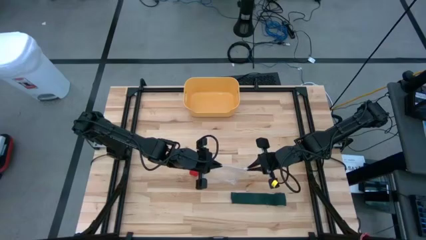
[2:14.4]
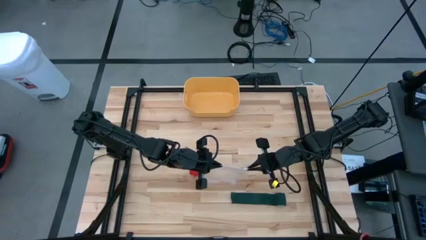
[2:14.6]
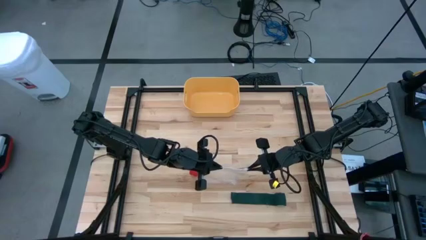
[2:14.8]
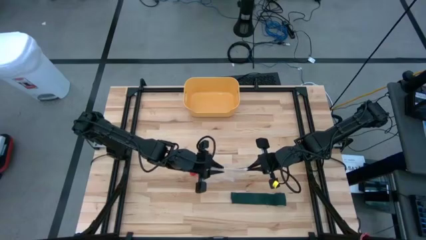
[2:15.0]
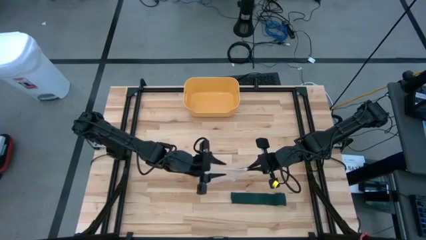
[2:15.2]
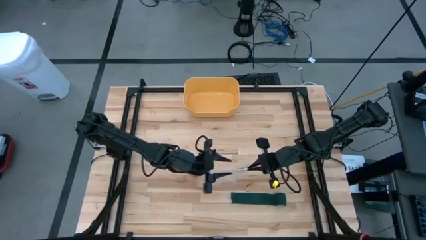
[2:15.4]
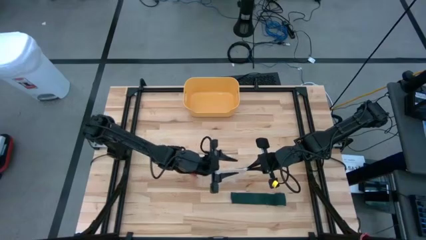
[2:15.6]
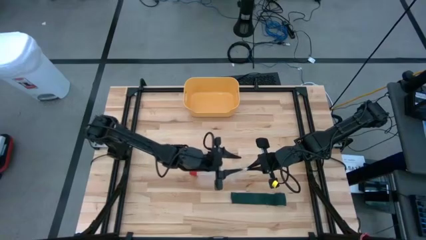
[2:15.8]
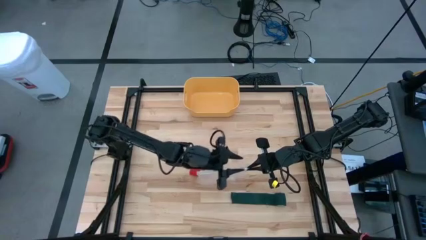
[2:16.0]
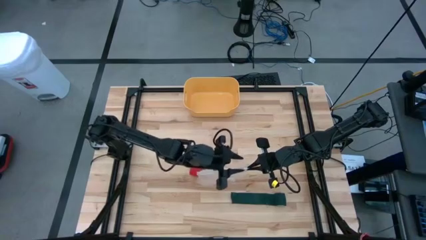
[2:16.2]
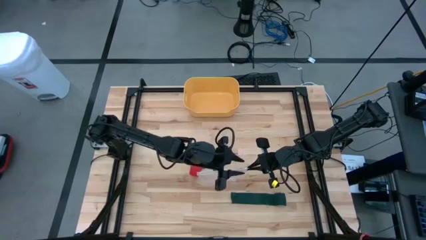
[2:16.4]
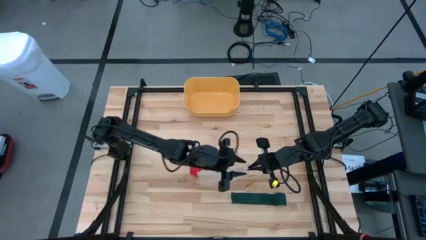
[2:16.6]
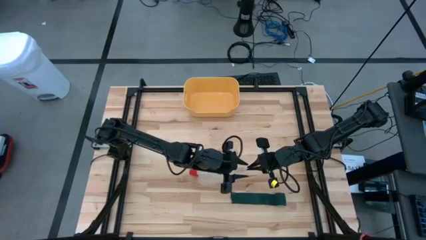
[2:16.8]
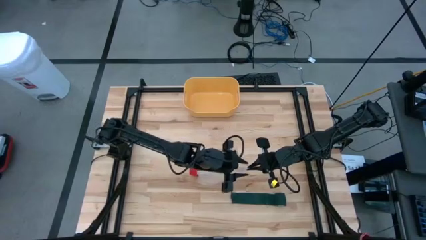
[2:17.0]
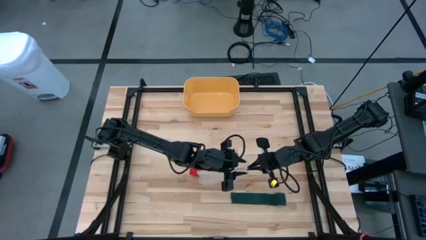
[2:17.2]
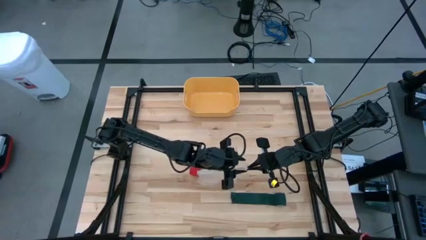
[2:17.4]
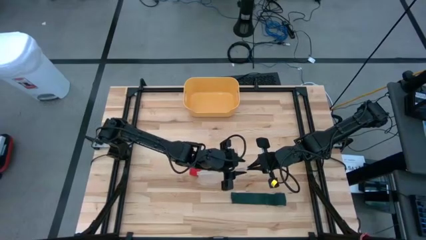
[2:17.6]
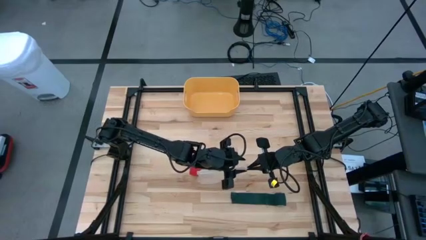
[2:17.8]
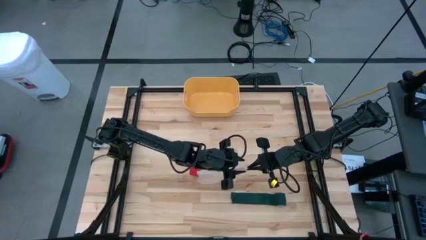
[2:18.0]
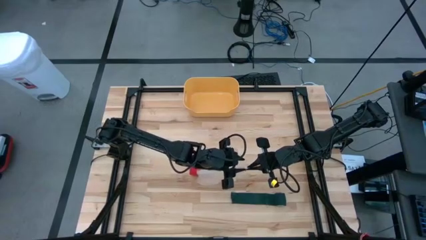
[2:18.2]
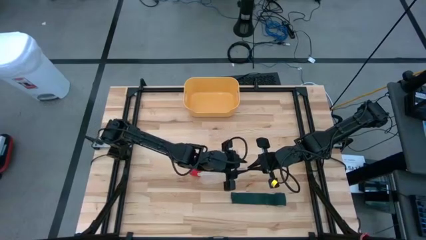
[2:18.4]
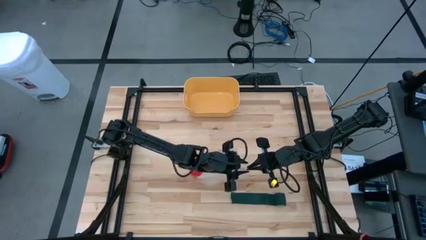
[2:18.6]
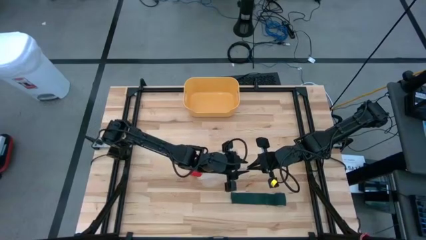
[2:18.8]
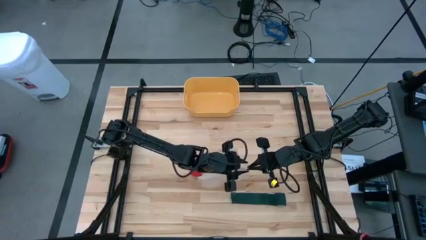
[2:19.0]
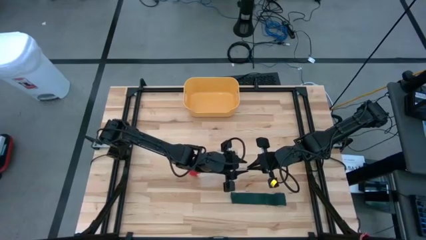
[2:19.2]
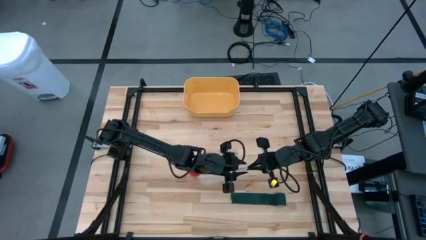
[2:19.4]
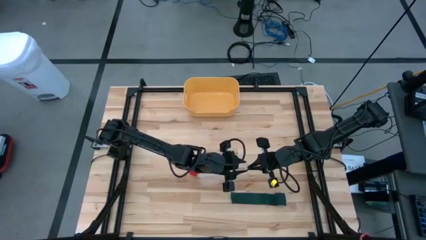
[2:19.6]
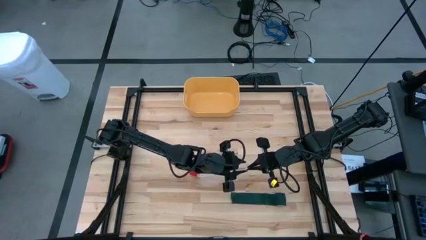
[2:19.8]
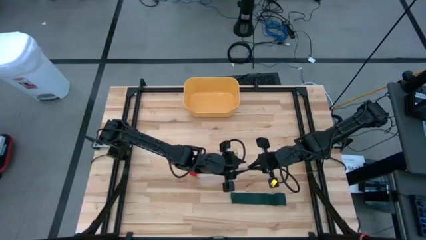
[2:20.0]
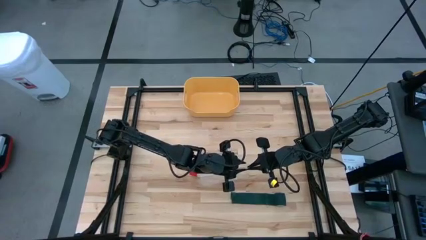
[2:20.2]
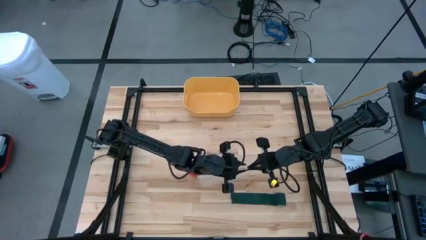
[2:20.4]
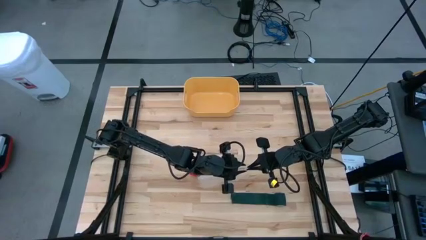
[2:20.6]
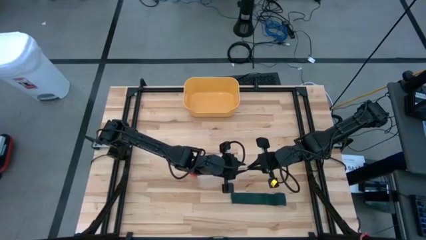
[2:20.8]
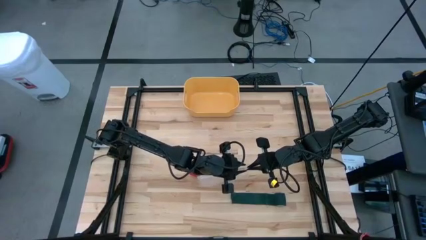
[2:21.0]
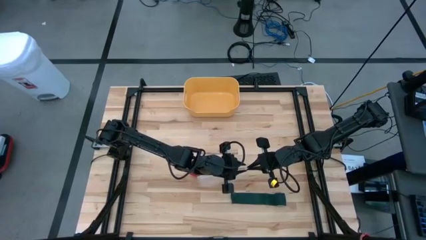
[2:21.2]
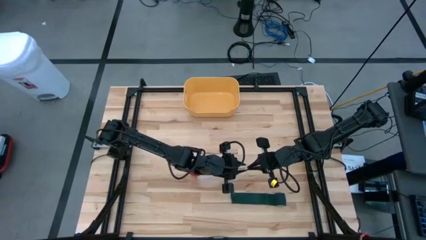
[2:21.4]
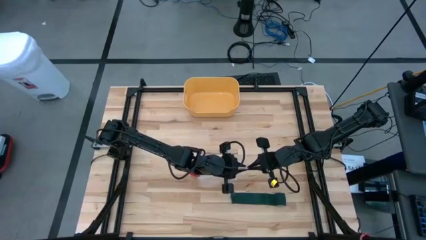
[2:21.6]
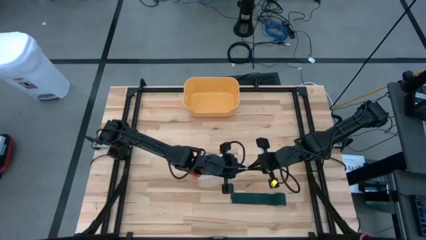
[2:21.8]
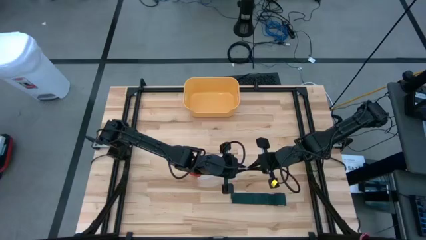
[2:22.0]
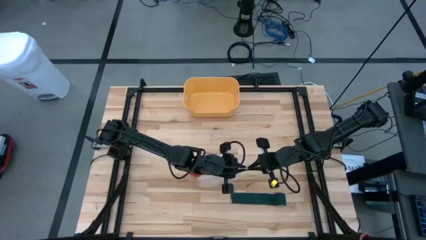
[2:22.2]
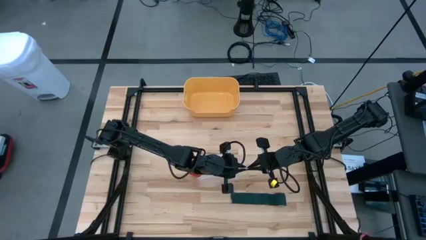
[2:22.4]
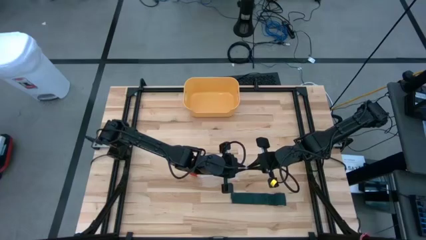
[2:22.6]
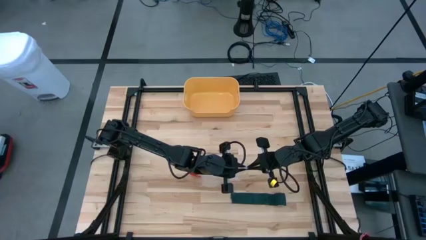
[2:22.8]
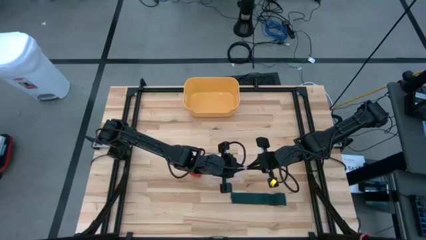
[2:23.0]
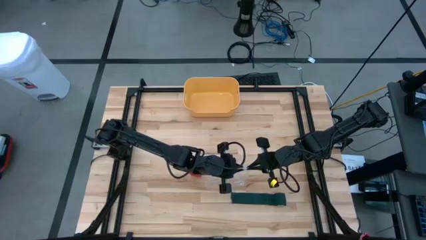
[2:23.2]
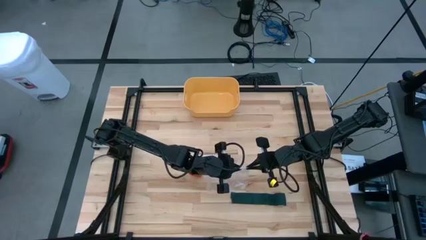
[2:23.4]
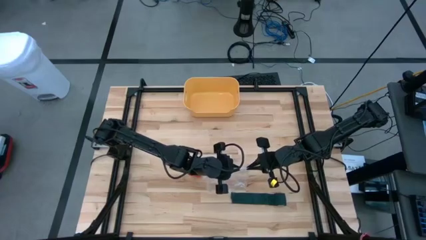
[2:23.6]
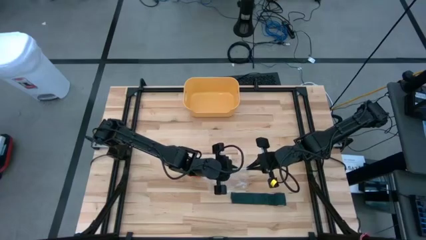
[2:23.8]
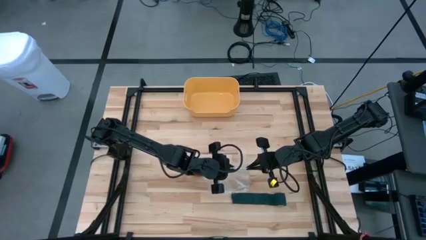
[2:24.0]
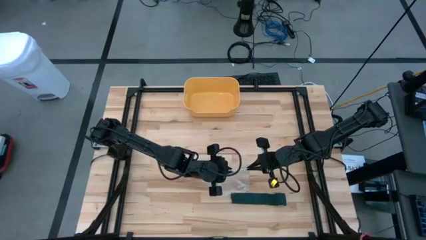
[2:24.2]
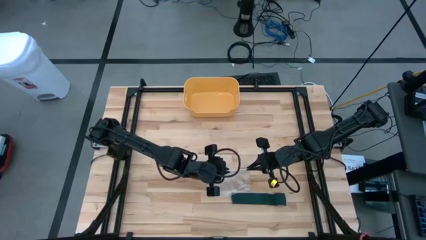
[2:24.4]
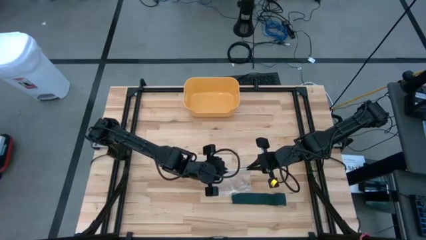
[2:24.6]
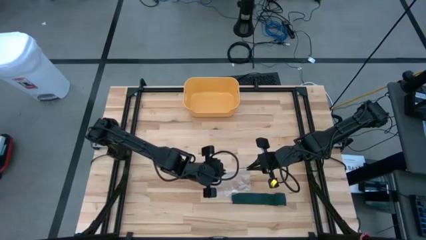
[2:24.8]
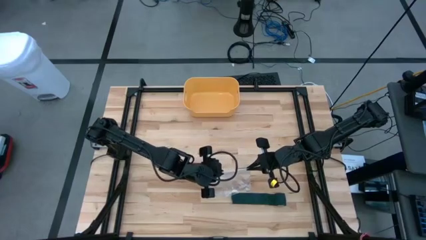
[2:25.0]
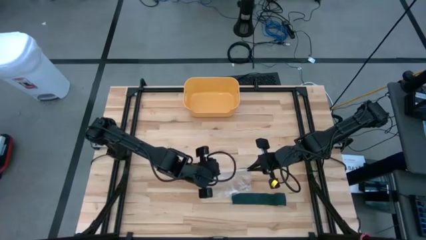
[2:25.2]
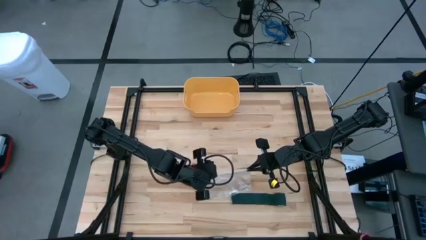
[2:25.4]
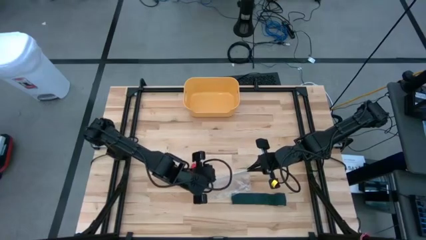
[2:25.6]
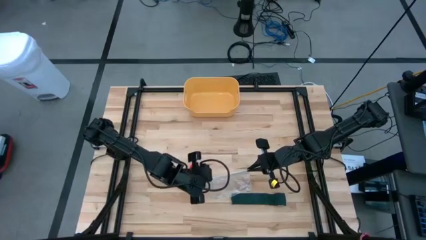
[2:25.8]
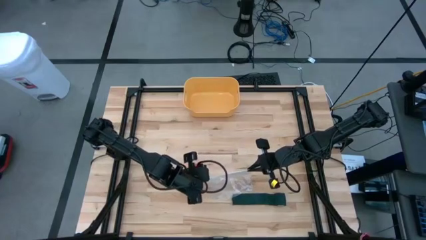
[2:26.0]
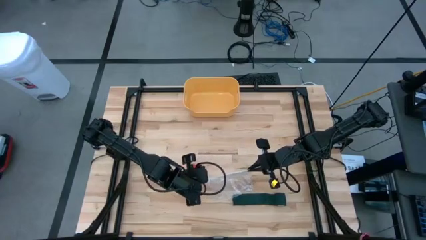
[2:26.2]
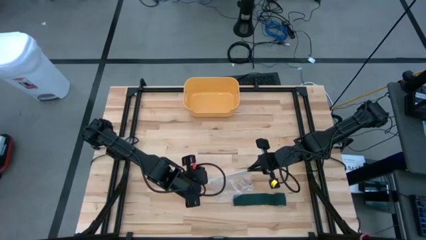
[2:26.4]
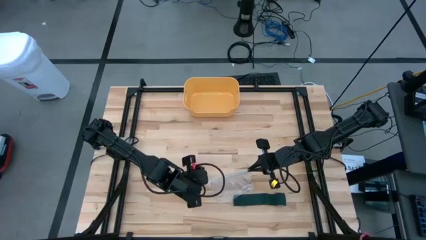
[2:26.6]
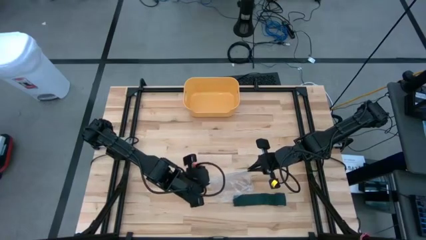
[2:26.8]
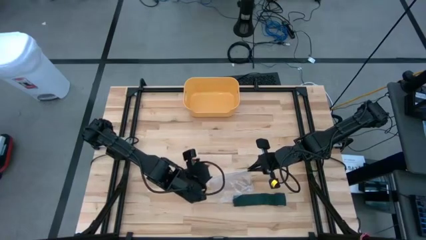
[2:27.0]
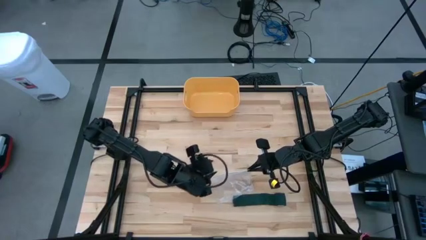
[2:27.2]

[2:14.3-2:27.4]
Task: Roll bandage
Open the transparent zip bag

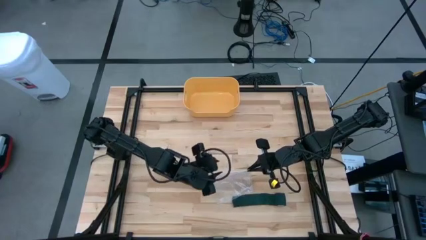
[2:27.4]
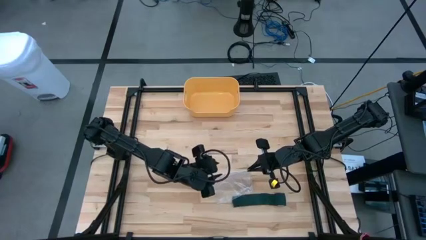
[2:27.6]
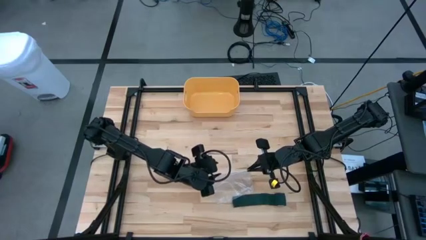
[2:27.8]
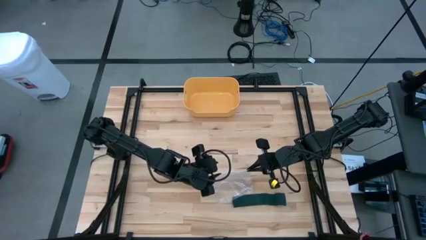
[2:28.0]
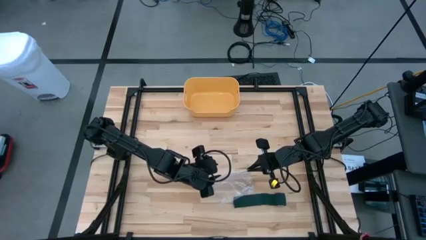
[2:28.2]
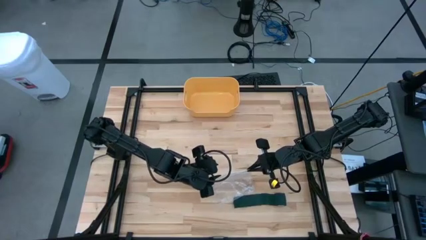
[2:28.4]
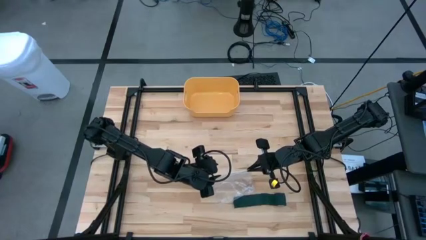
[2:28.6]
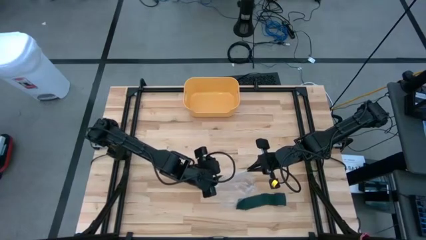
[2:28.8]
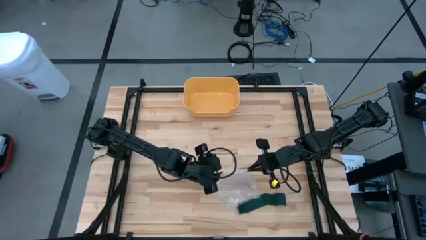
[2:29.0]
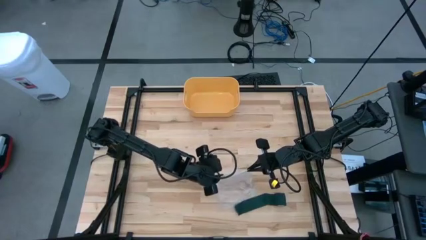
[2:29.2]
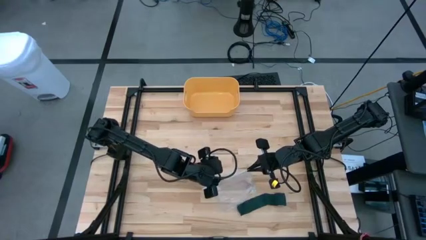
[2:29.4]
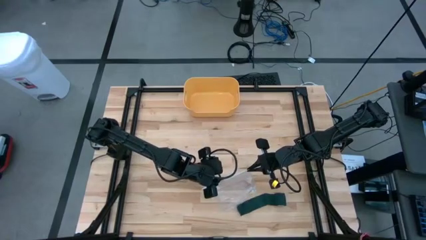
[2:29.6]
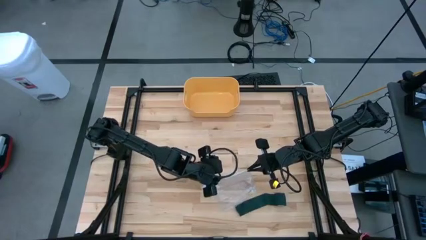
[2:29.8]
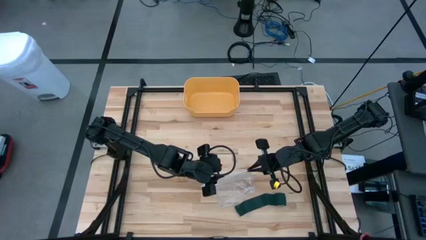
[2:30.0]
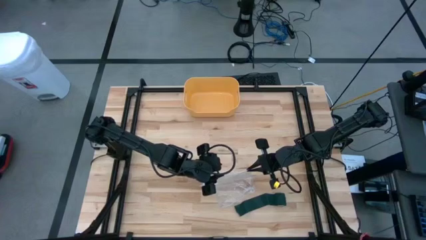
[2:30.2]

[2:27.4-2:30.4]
Open the transparent zip bag

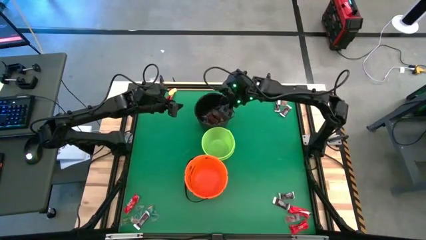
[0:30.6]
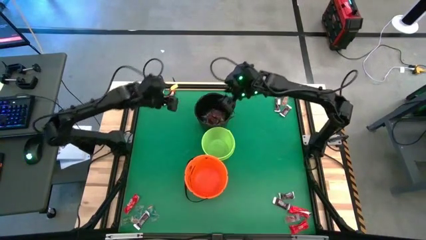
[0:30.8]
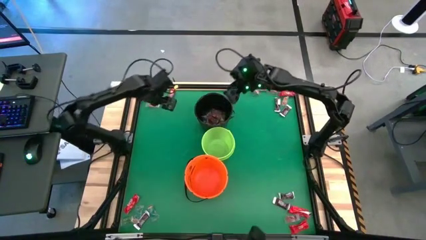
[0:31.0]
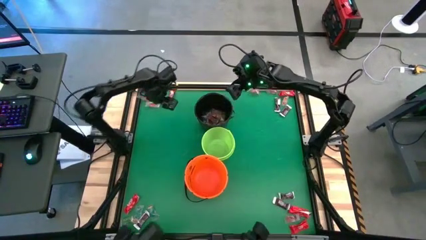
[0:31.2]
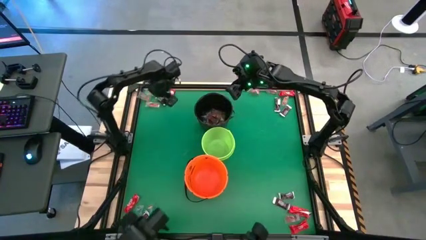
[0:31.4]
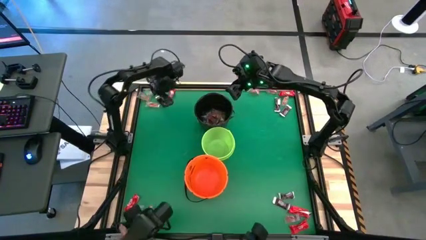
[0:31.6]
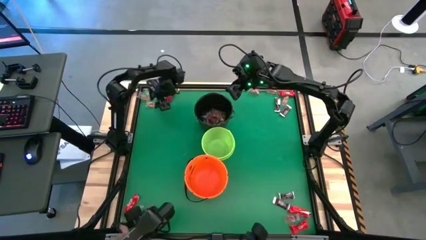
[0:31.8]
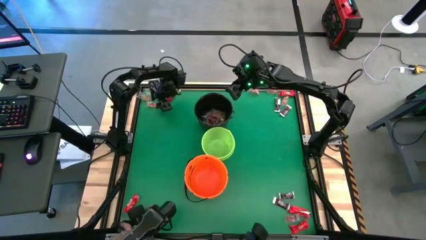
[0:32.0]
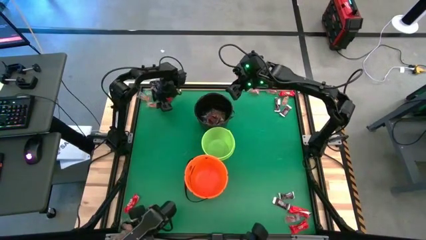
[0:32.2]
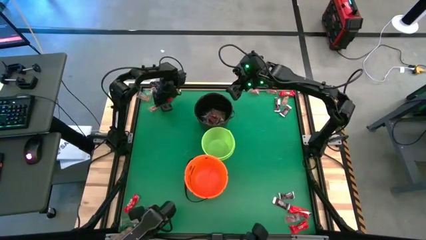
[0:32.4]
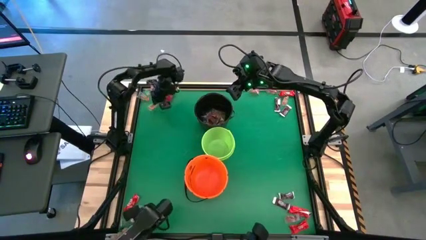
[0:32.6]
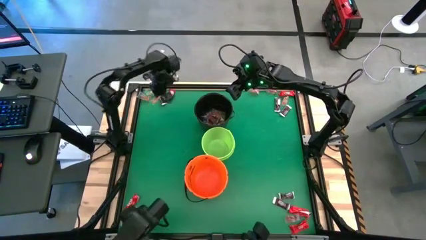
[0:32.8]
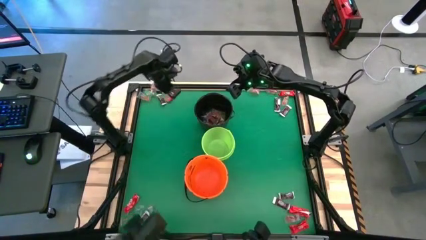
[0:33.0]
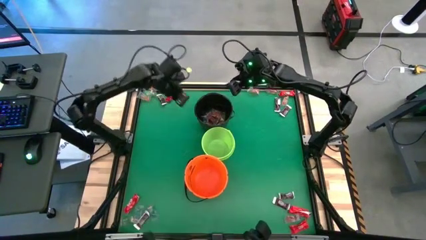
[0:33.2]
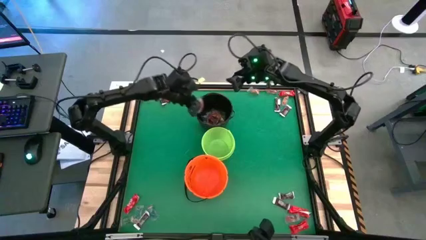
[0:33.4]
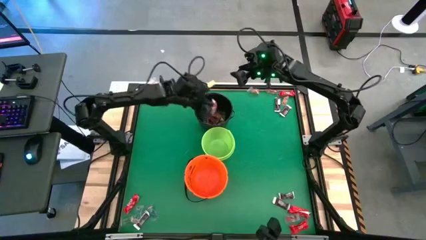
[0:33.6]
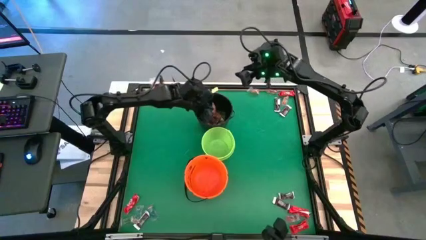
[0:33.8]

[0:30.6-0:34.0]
Task: Sort candy by brand, put in halloween buckets
Put the orange gummy into the black bucket
